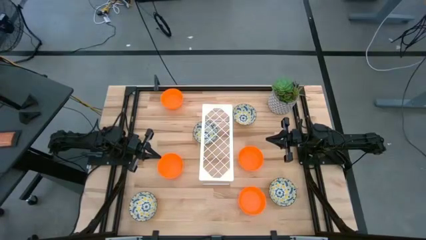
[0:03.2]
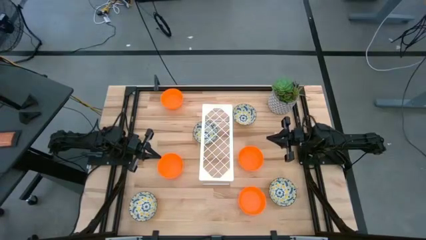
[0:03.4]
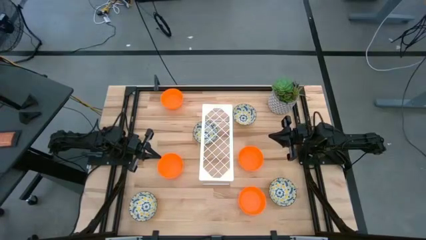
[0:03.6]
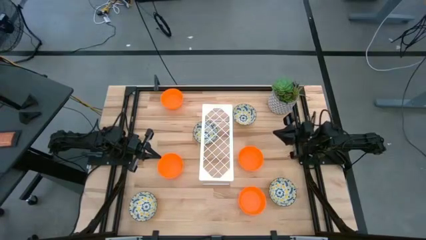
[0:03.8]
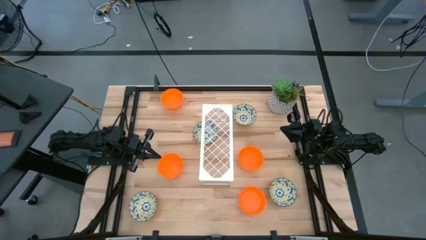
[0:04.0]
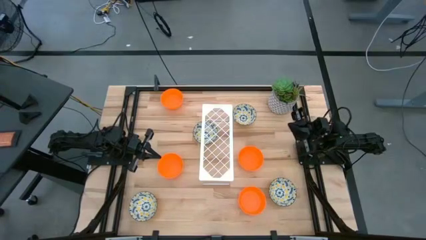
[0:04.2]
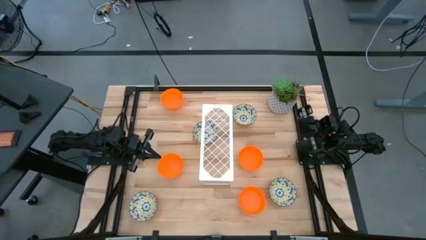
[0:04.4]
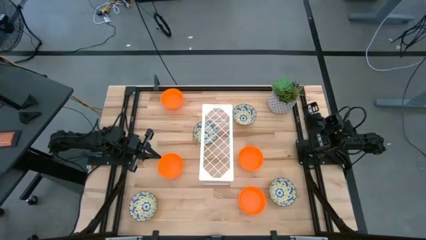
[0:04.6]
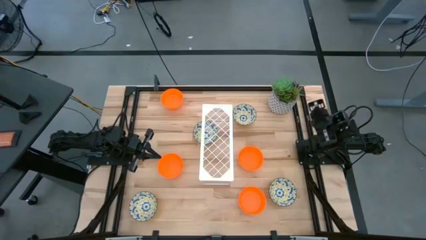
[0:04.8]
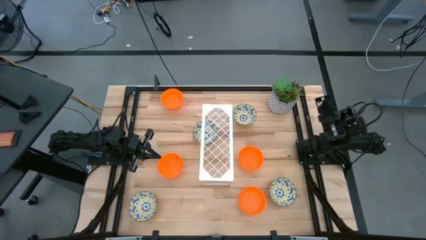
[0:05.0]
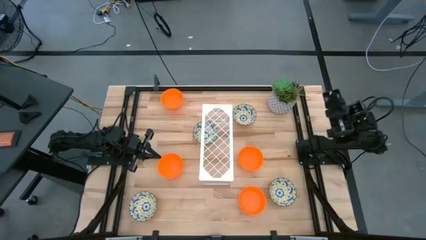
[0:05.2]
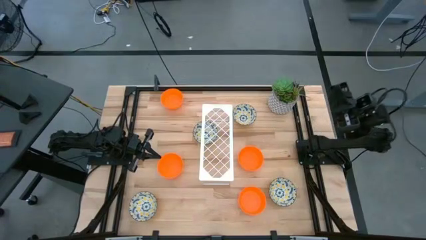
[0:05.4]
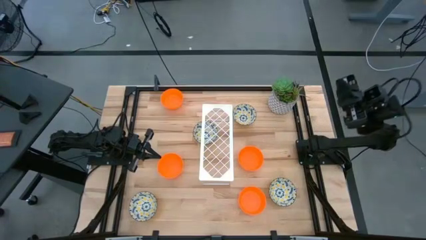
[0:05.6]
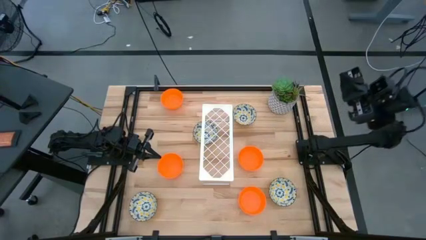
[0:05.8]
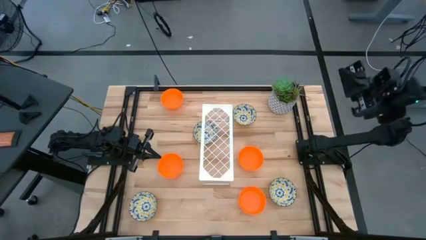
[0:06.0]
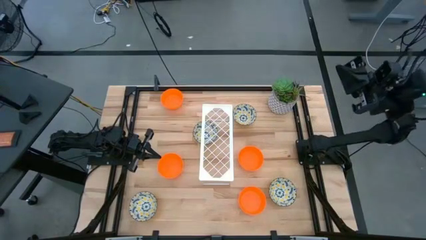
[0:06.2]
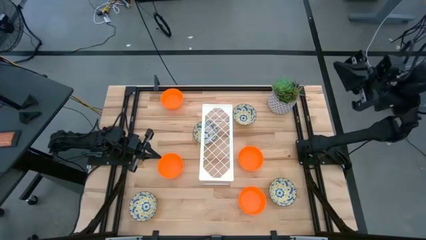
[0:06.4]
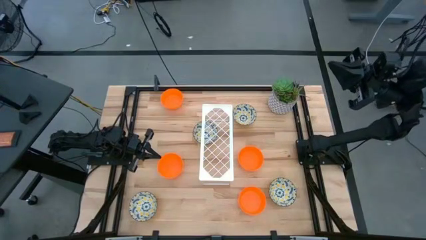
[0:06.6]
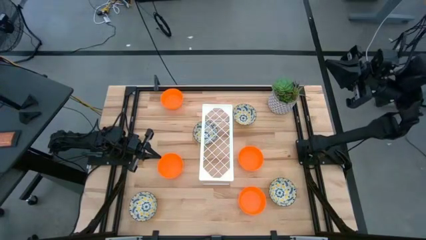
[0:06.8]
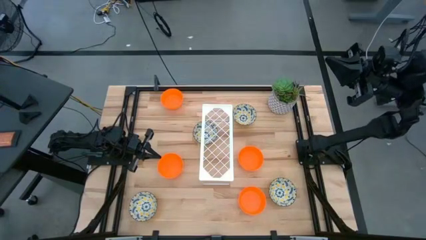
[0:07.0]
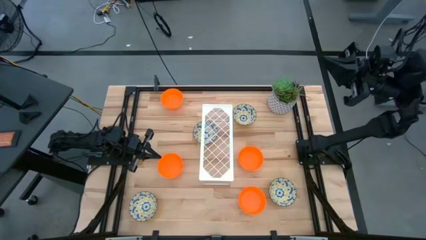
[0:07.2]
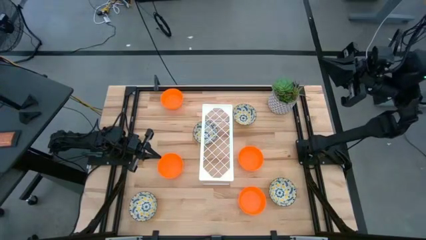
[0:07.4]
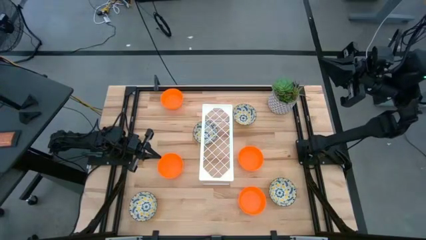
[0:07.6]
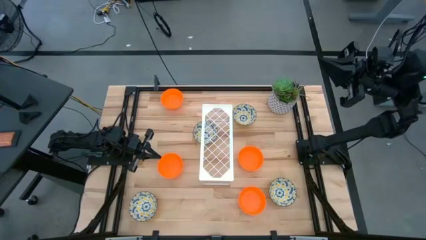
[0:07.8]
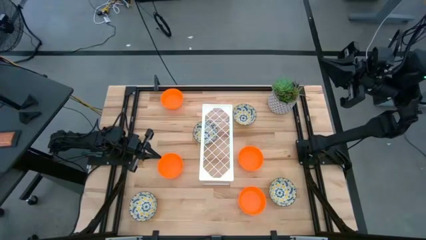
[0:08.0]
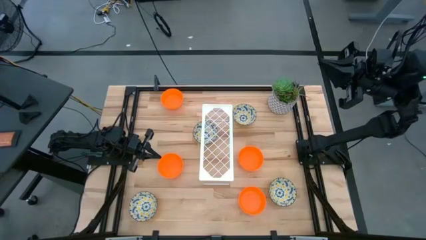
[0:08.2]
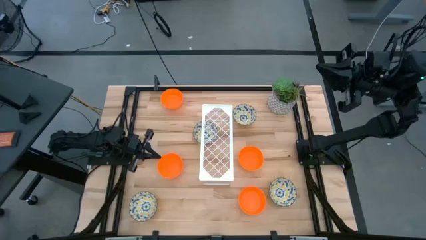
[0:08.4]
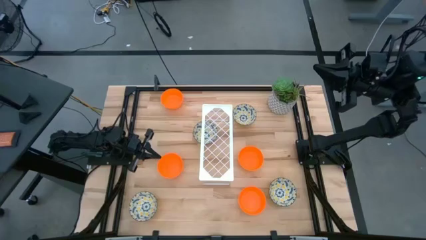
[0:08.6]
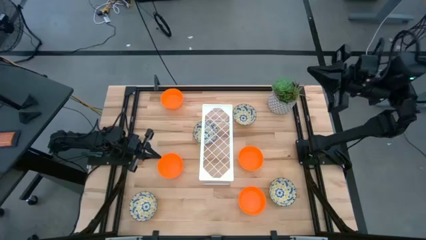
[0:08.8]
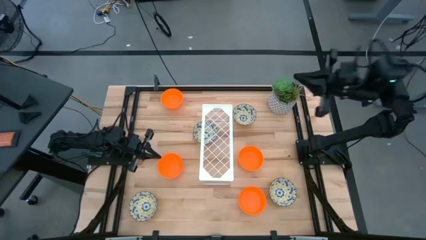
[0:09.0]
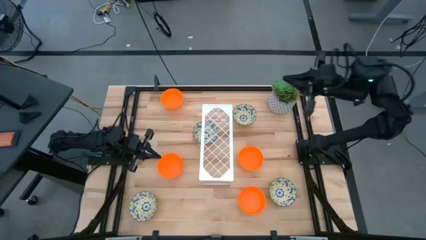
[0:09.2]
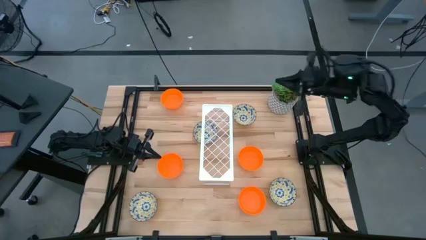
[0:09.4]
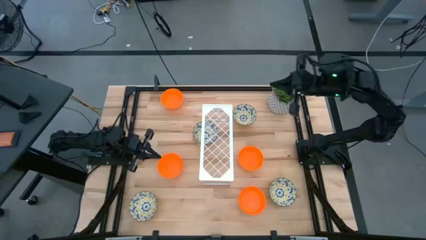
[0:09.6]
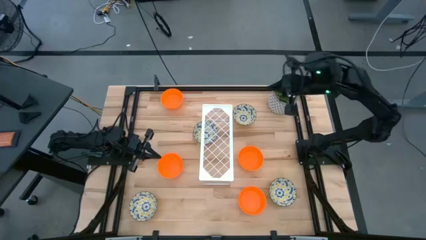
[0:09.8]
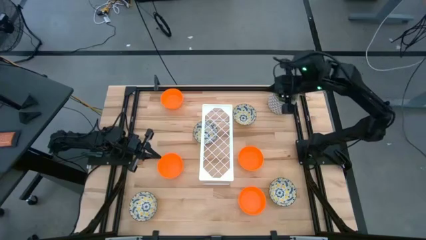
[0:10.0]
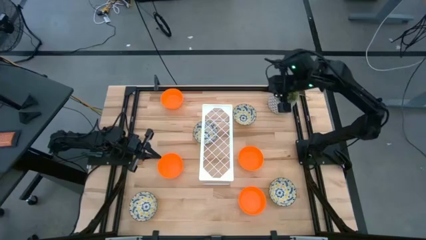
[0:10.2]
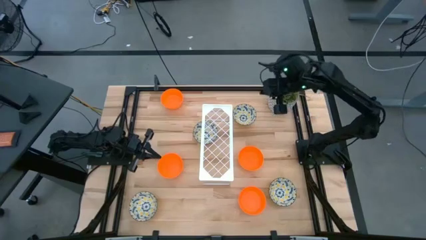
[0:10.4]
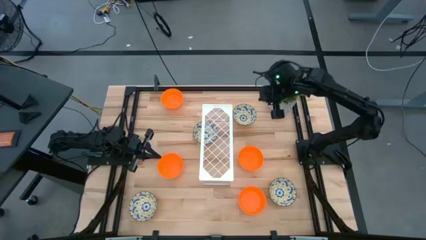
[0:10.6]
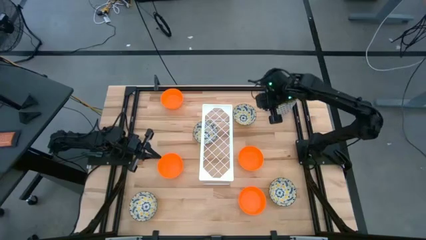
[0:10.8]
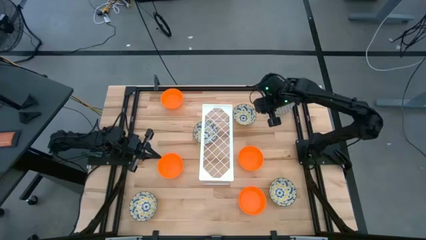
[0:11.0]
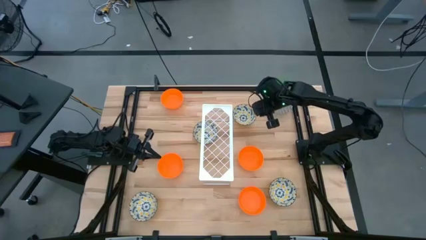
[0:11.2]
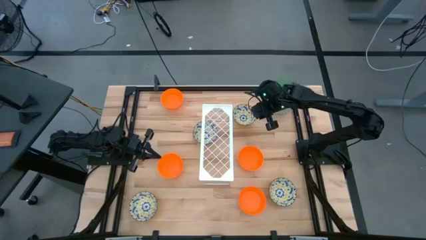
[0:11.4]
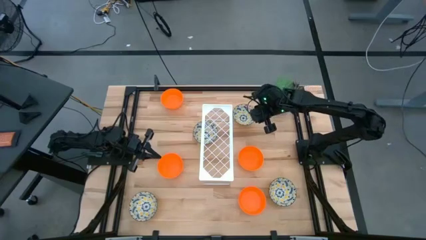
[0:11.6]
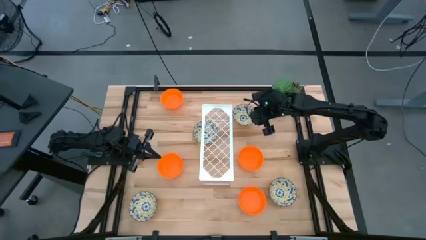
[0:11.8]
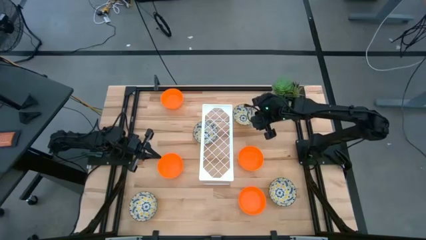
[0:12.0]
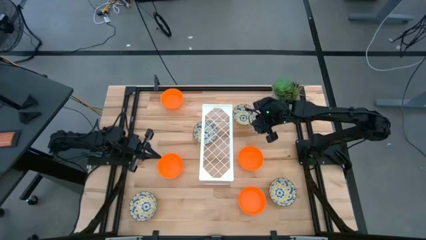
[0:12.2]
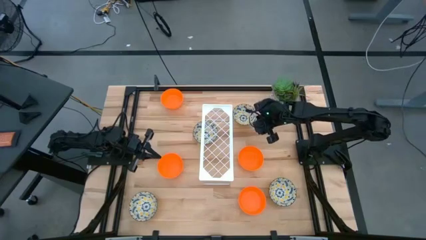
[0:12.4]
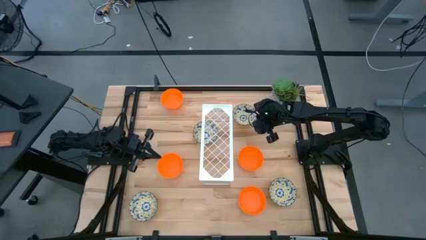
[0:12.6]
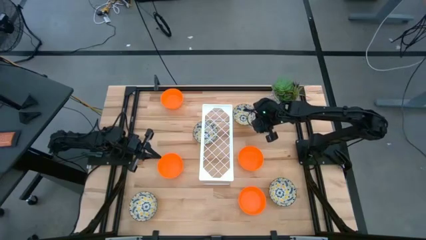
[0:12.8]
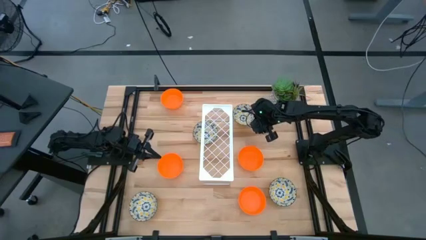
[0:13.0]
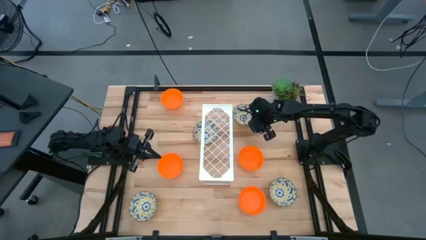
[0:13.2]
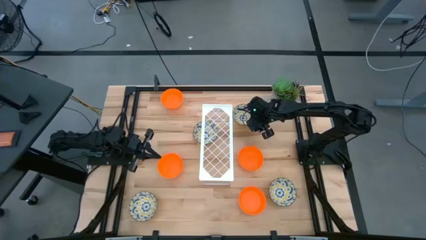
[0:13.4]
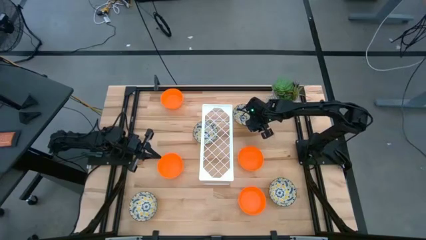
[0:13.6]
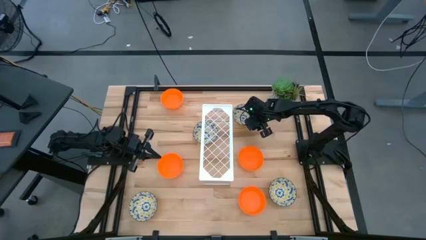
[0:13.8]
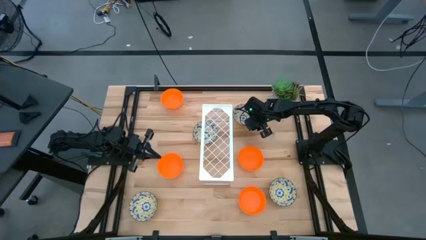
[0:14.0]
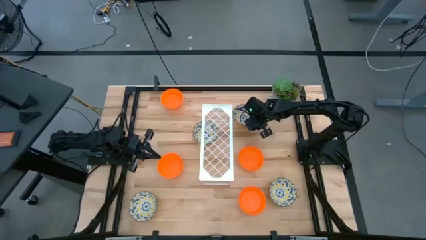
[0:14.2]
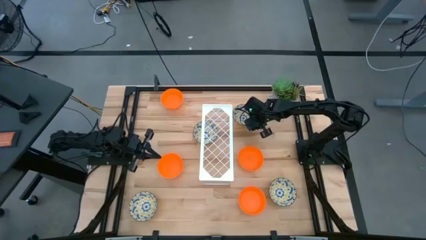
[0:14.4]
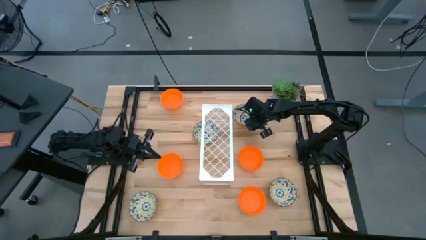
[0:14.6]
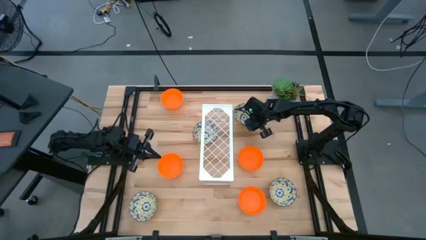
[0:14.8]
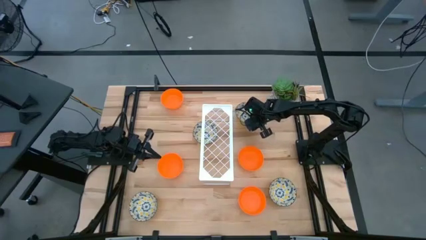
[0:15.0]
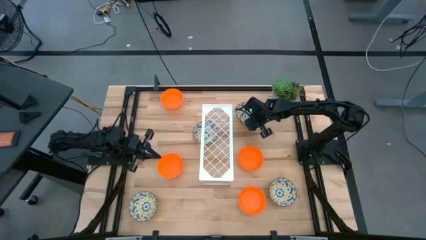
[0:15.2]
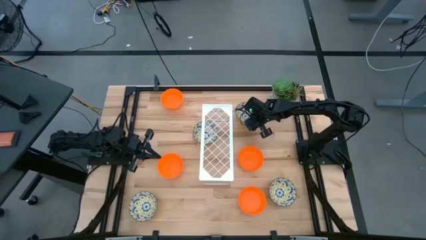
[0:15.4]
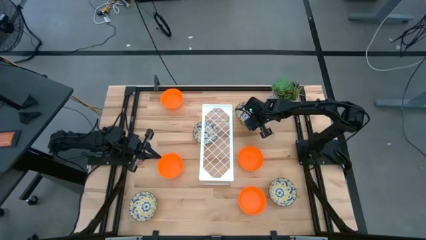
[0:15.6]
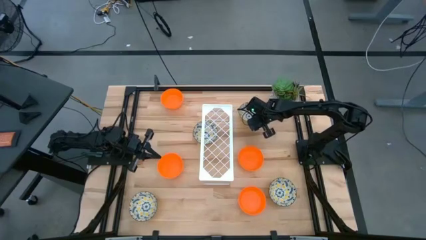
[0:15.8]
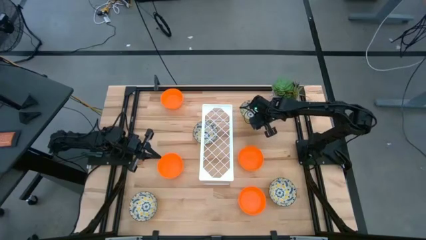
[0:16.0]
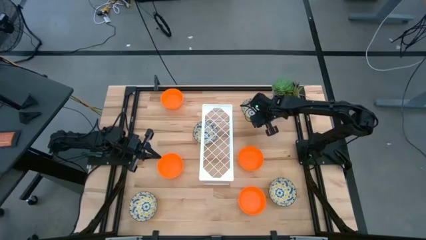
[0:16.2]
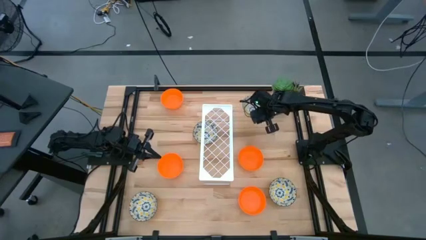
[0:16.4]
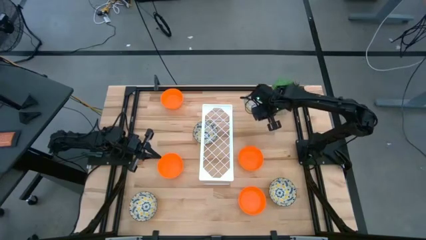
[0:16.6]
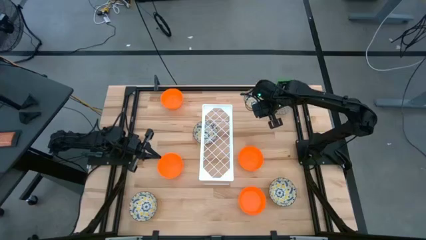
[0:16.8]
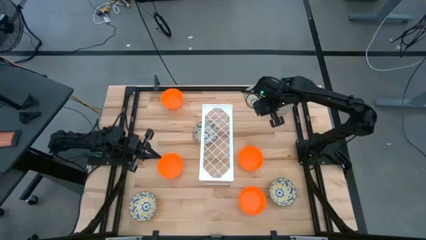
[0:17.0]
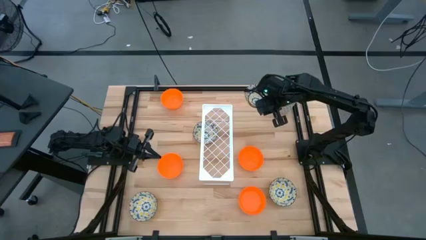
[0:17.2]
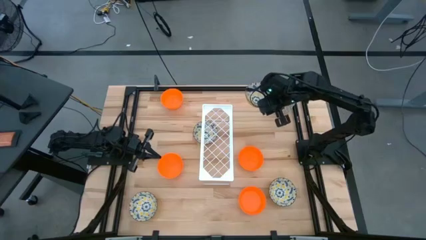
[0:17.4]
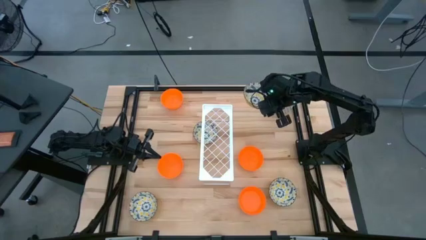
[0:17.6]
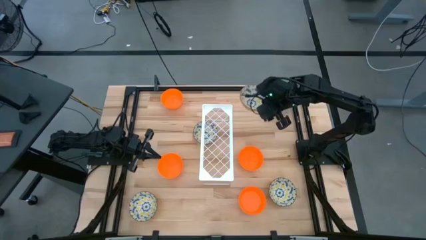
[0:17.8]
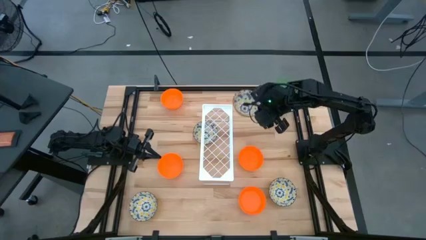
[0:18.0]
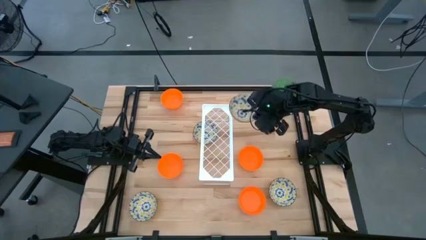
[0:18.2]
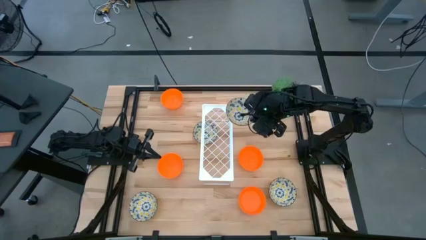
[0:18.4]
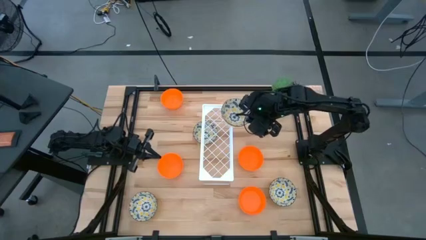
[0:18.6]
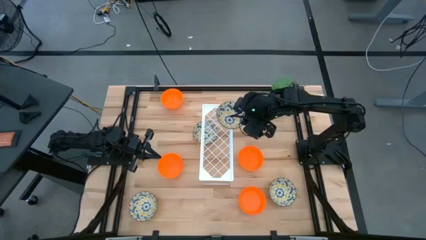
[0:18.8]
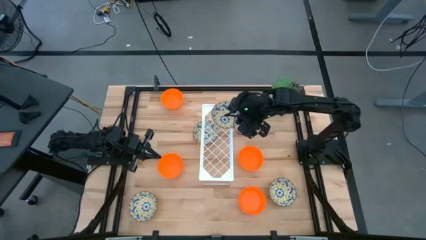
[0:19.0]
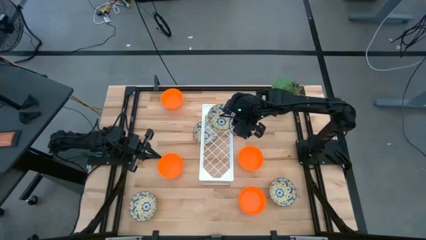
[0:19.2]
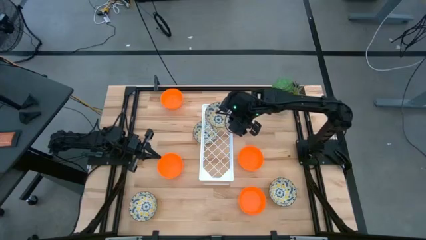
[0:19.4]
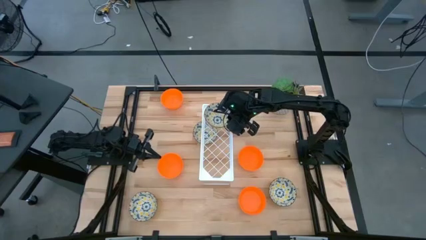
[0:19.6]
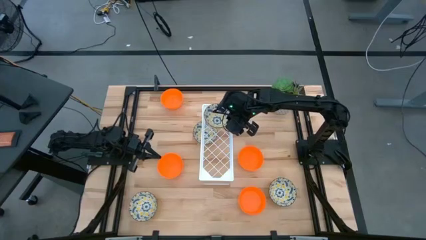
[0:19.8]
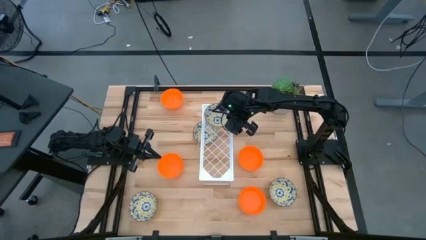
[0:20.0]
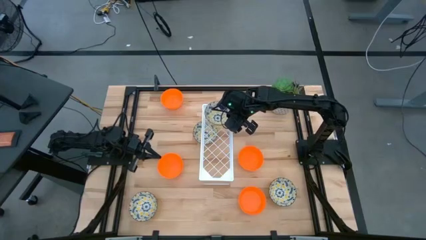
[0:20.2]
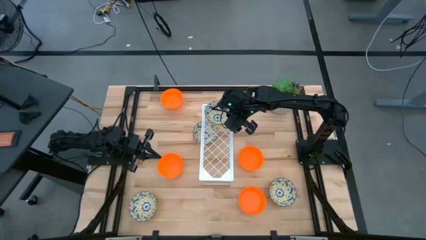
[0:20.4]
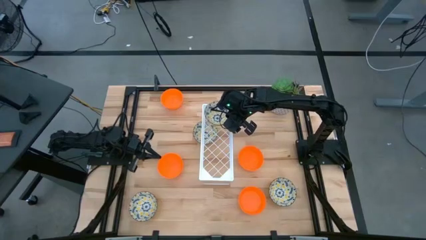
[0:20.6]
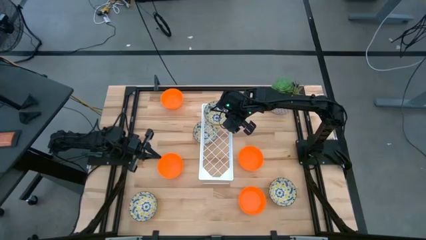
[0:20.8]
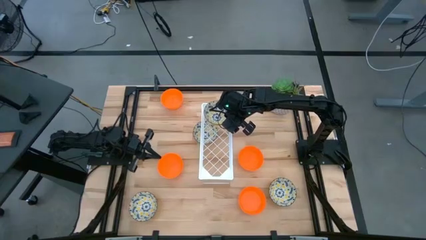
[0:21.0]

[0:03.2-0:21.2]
Task: Pick & Place Mini bowls
Put the yellow patterned bowl on the shelf
